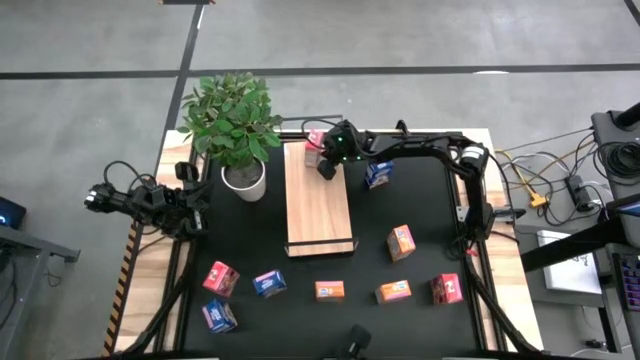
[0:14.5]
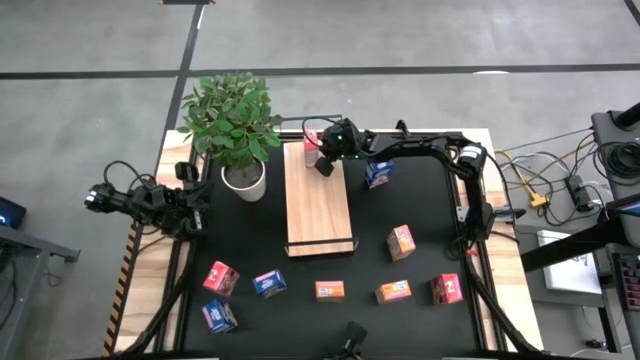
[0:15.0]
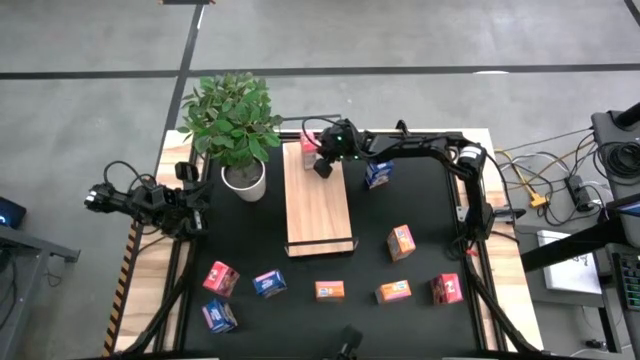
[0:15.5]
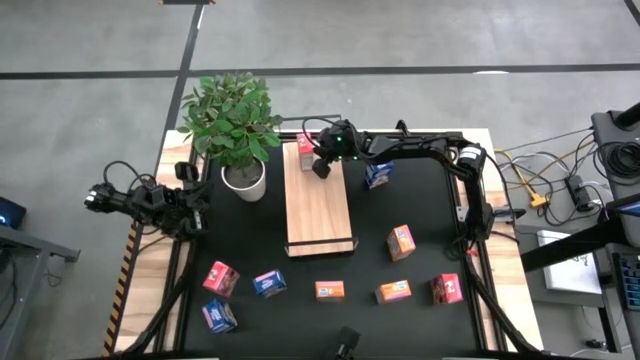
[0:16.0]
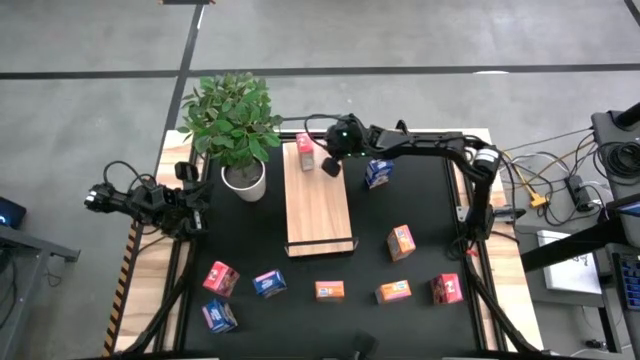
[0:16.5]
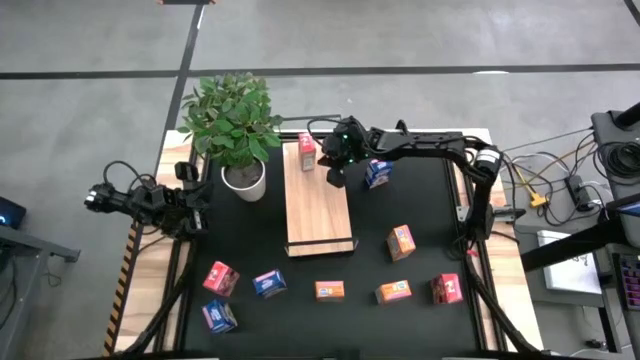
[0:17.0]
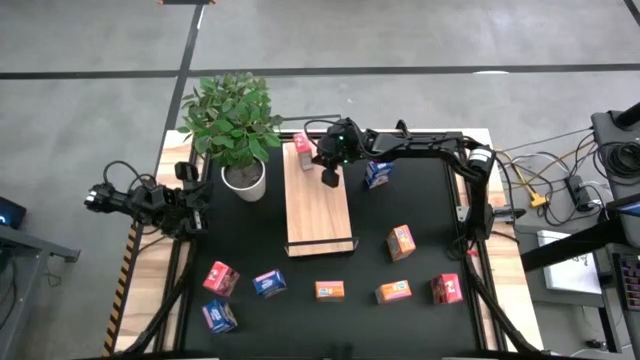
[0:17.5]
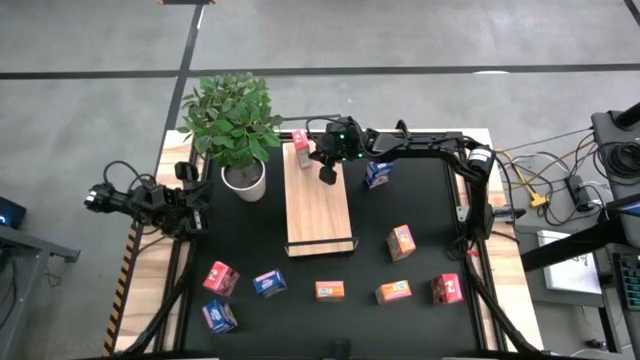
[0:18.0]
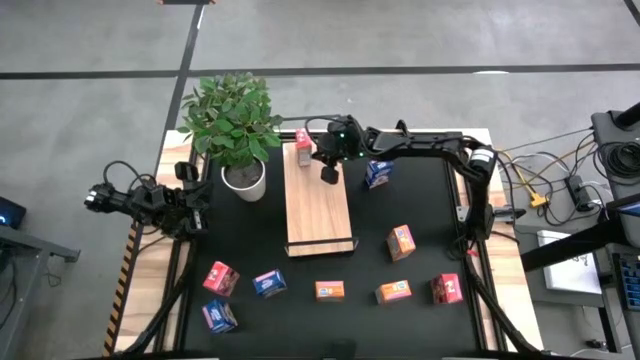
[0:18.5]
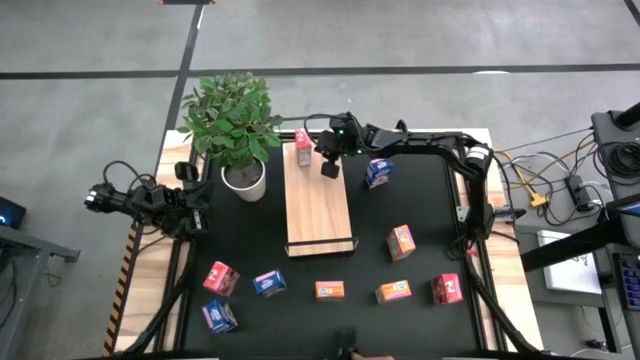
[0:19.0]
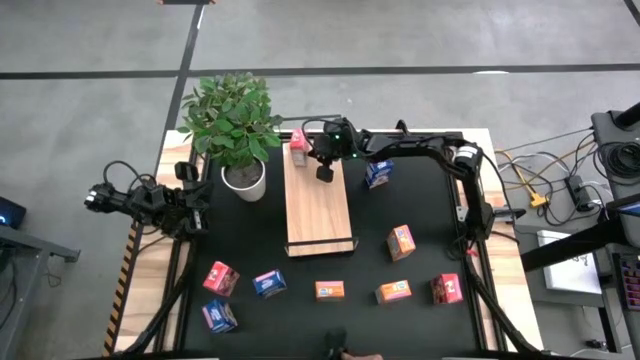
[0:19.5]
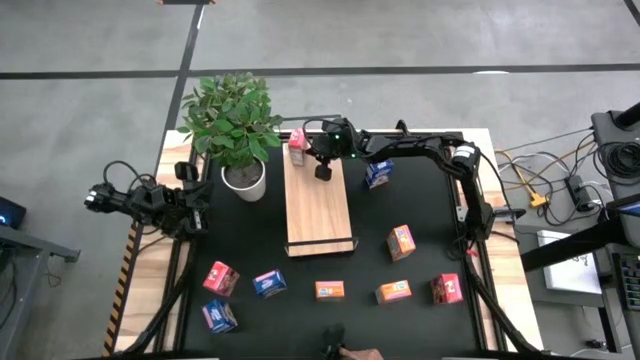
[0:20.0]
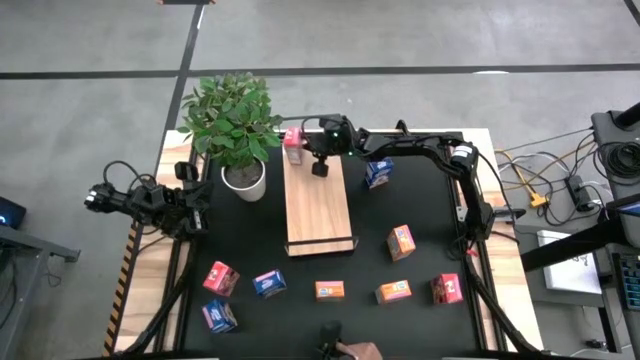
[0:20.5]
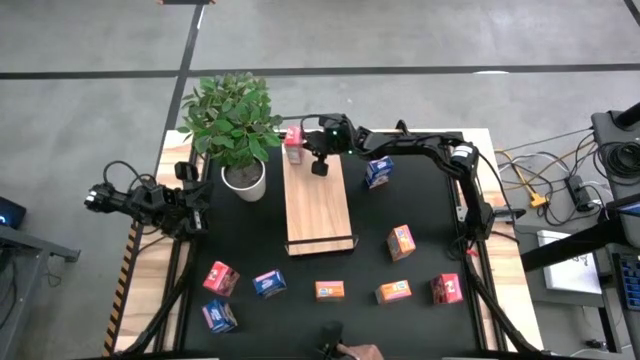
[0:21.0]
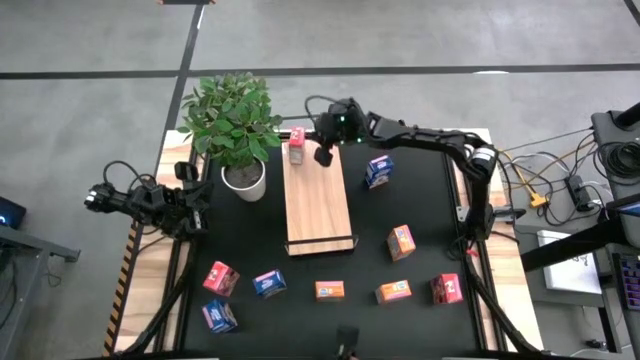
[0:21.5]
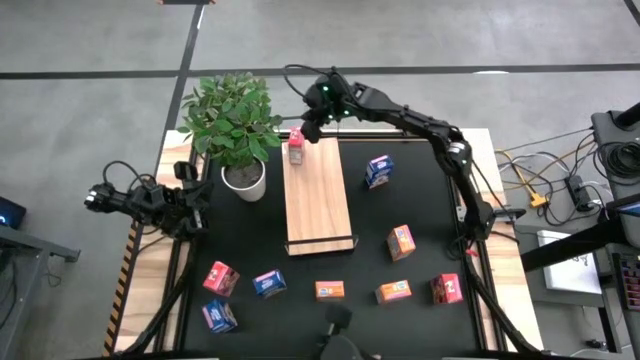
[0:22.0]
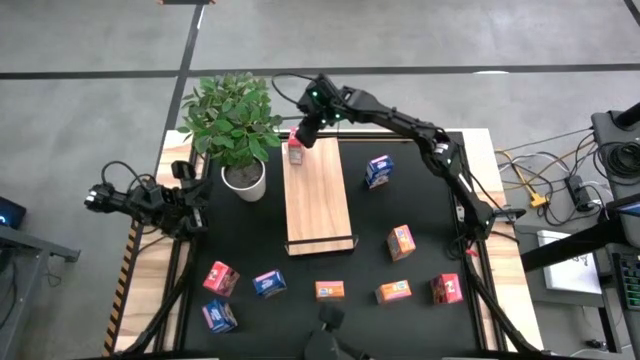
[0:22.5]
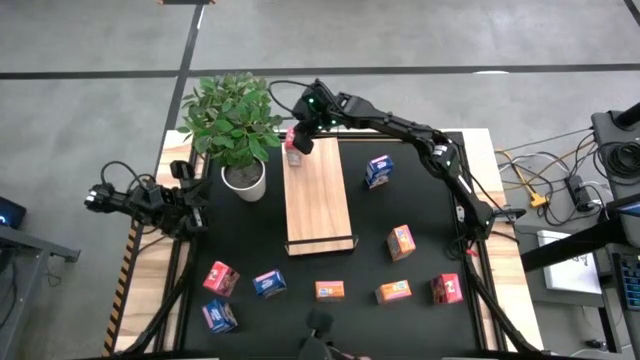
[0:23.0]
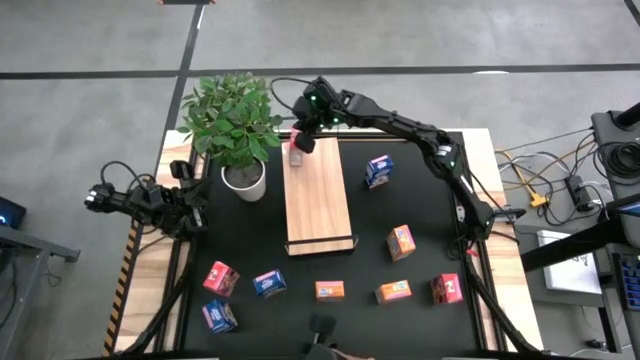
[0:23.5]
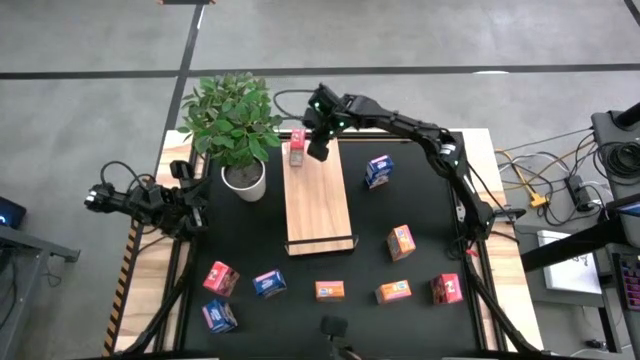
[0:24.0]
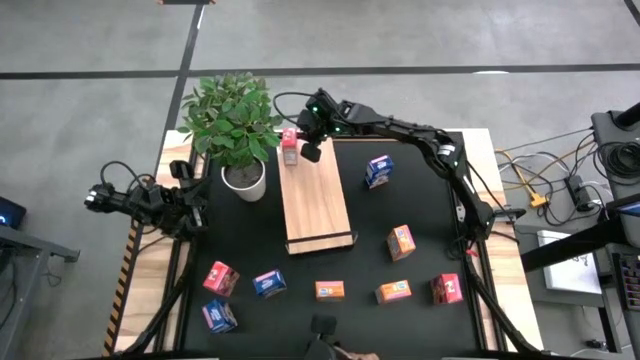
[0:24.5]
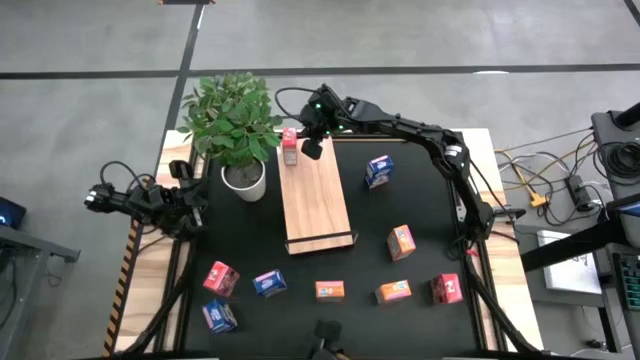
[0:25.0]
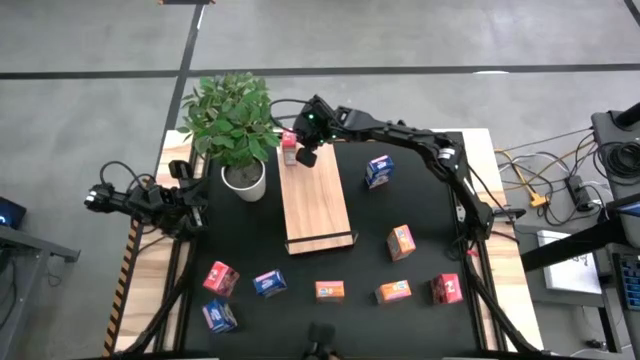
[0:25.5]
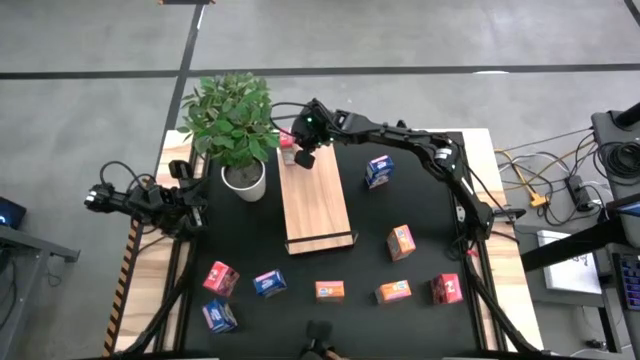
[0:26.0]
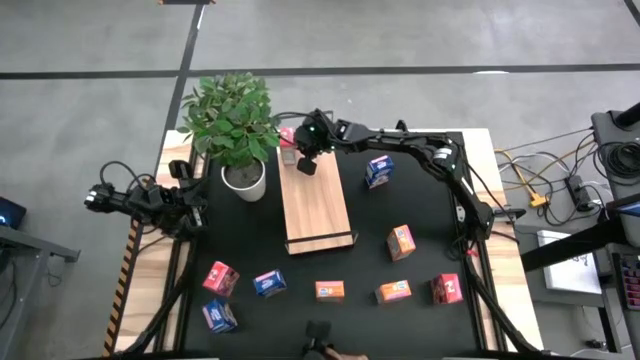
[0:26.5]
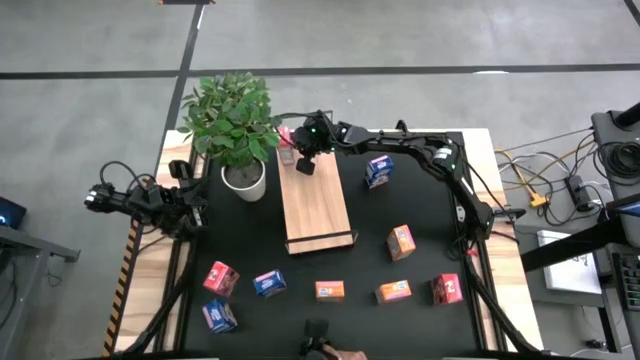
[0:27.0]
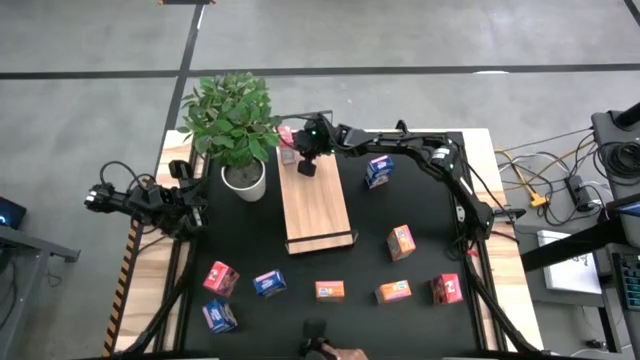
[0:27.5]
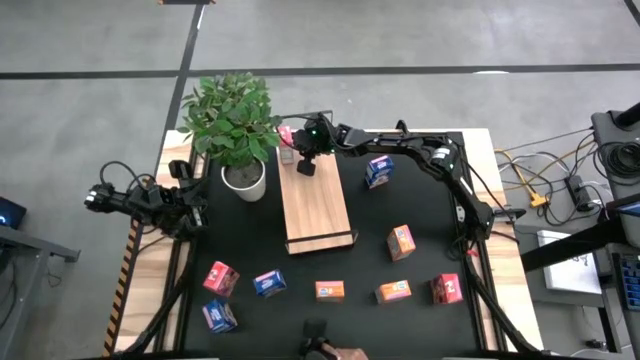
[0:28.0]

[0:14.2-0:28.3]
Task: Stack cereal on shelf
Put the top red cereal box on the shelf

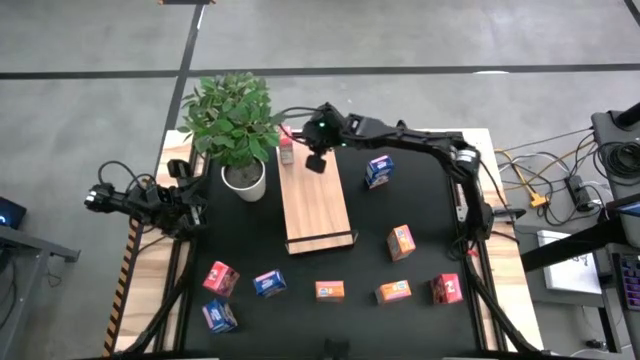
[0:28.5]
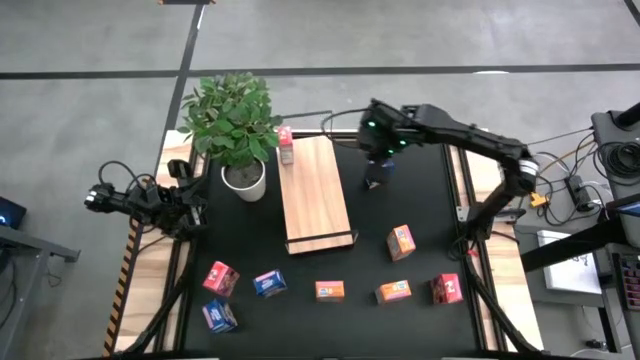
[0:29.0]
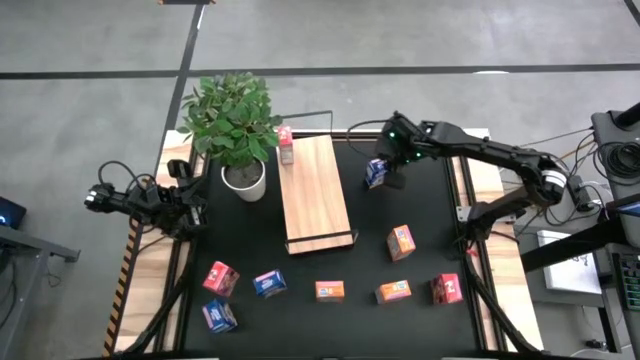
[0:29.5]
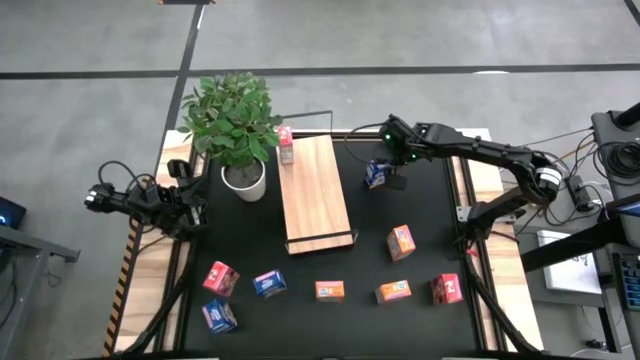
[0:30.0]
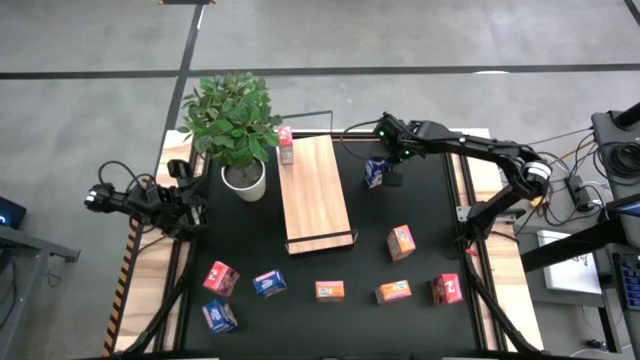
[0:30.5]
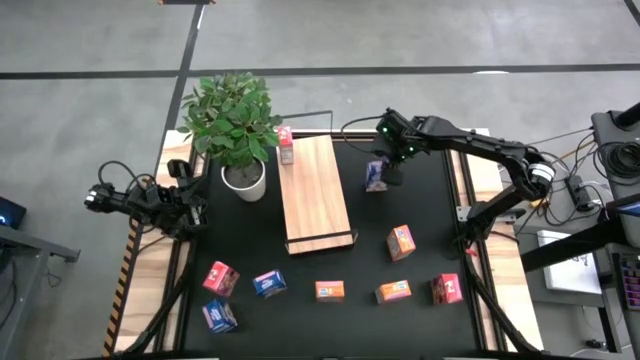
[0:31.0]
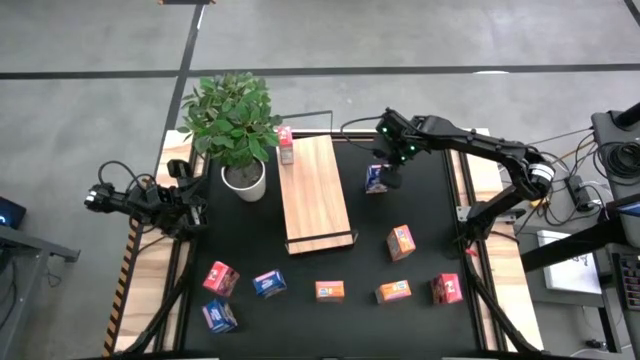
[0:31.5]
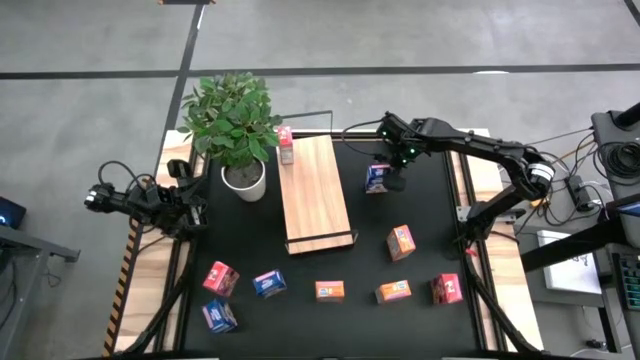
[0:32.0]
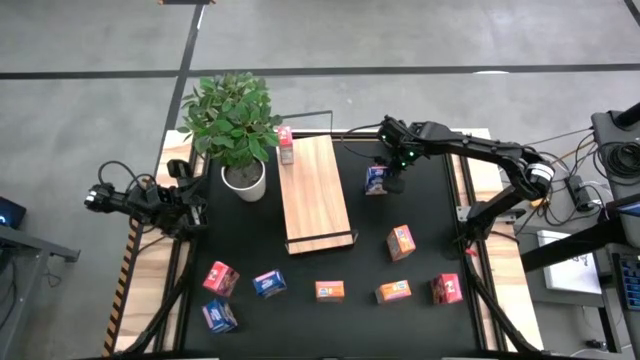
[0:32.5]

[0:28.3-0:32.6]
Put the top blue cereal box on the shelf

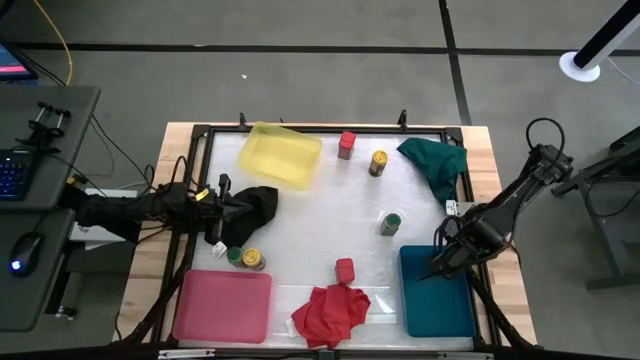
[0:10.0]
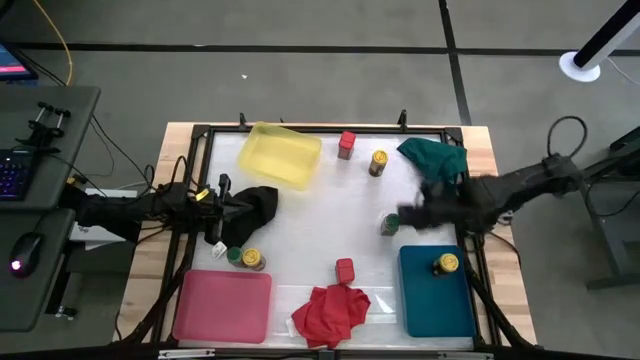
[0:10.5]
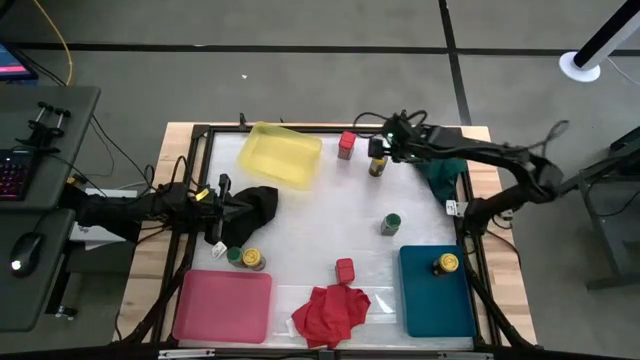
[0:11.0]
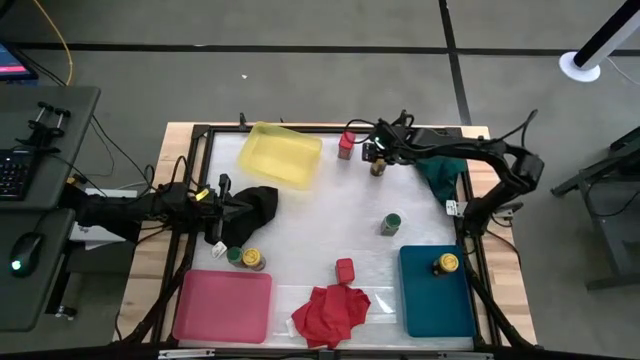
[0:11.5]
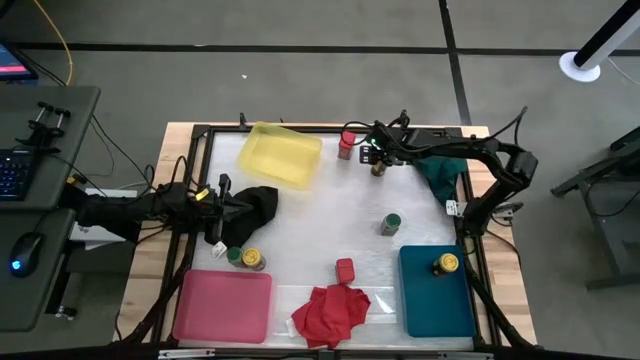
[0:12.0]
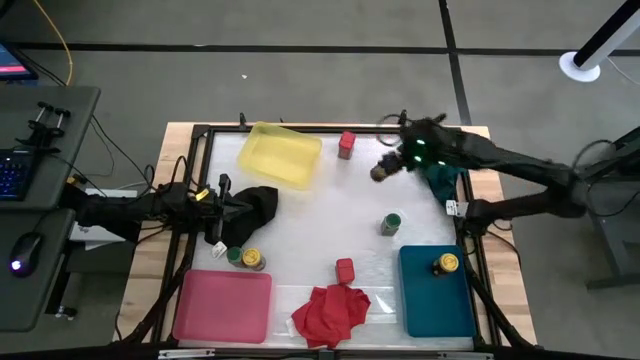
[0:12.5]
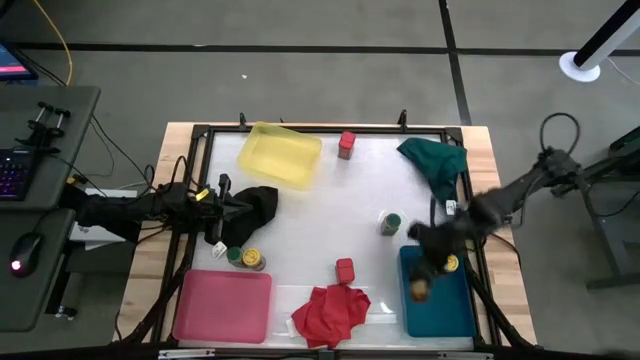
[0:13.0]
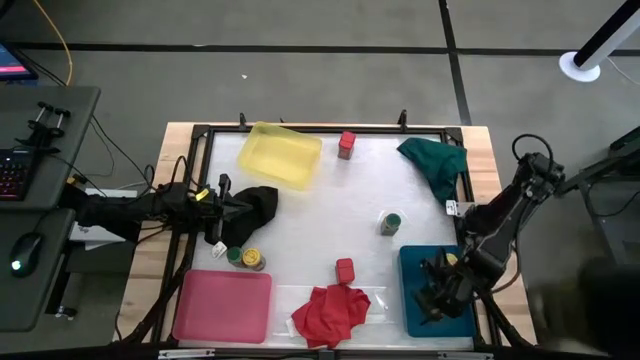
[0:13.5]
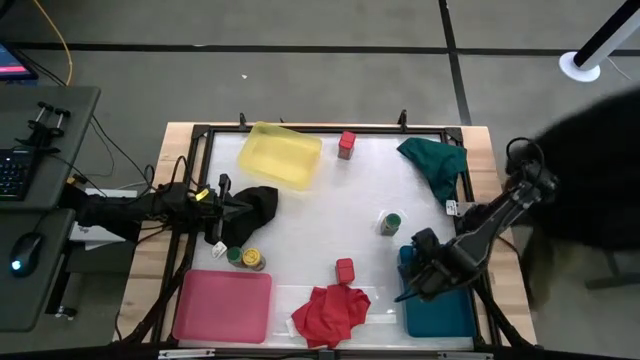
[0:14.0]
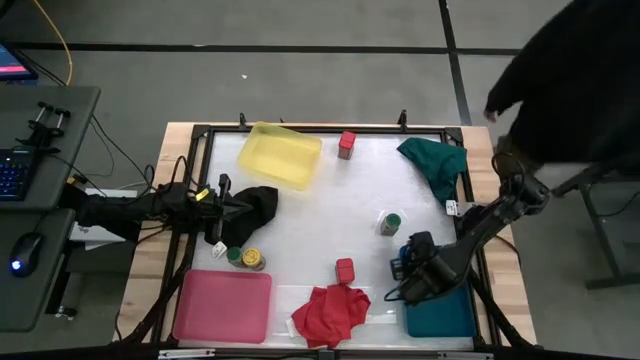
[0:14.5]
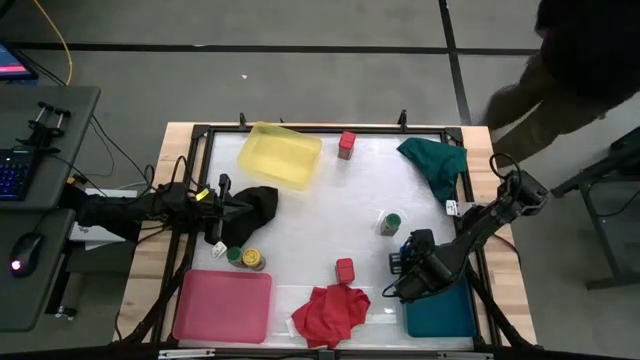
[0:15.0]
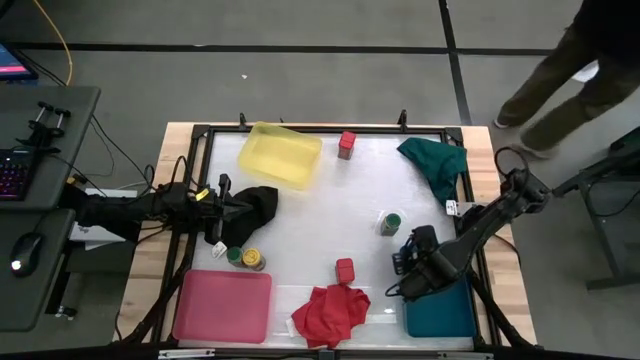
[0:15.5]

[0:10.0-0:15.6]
Task: Sort spices by type
Put the top yellow seasoning bottle into the blue bin
